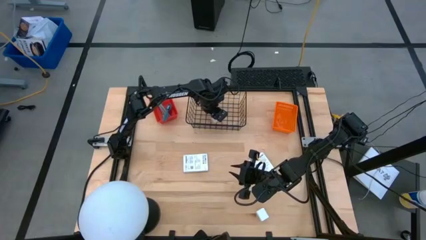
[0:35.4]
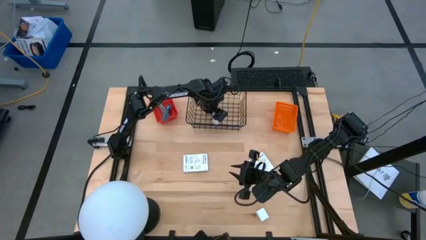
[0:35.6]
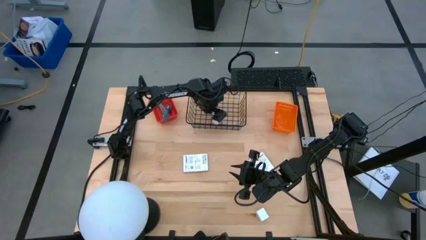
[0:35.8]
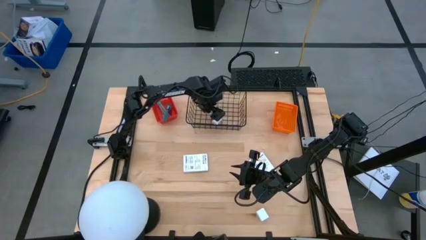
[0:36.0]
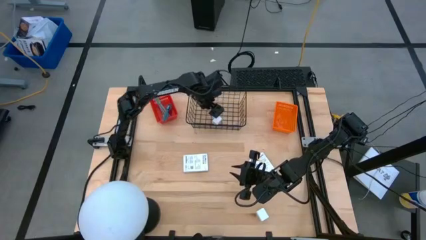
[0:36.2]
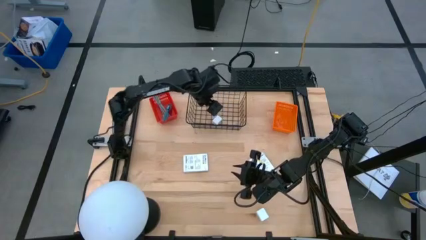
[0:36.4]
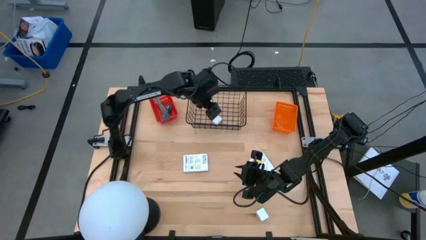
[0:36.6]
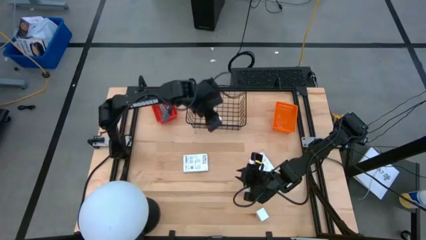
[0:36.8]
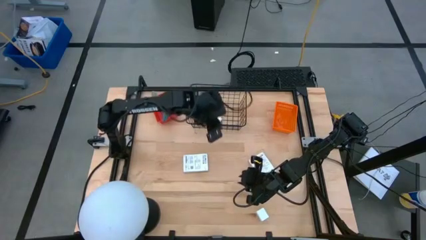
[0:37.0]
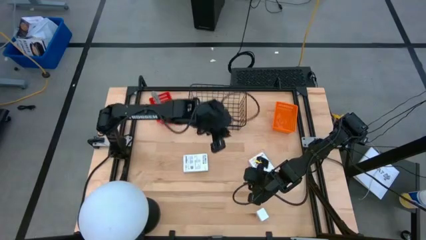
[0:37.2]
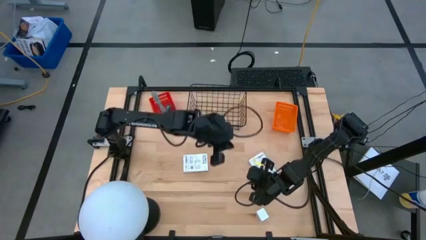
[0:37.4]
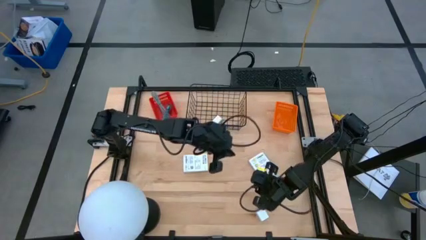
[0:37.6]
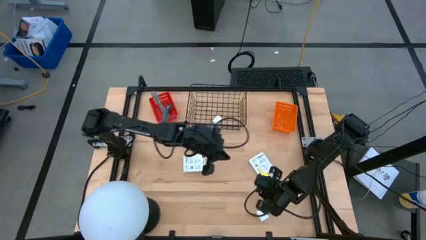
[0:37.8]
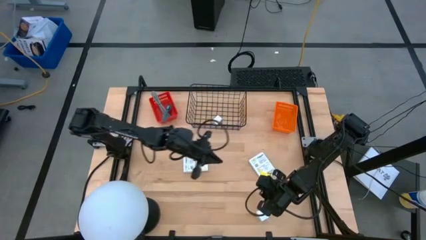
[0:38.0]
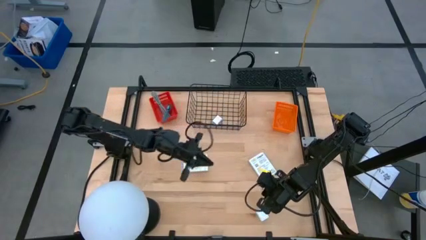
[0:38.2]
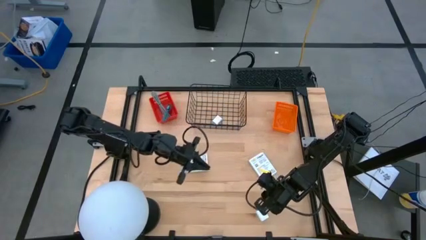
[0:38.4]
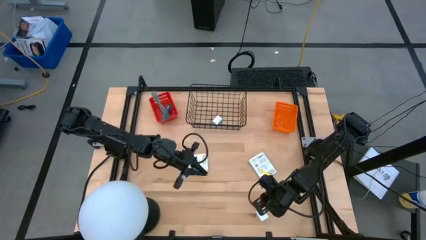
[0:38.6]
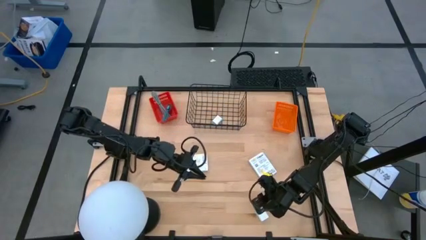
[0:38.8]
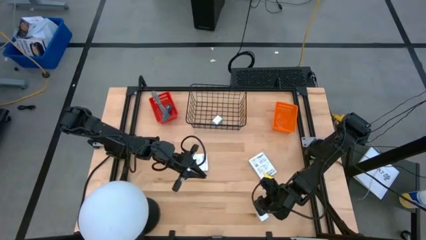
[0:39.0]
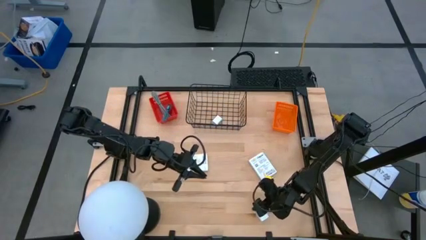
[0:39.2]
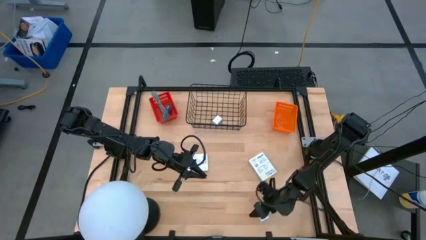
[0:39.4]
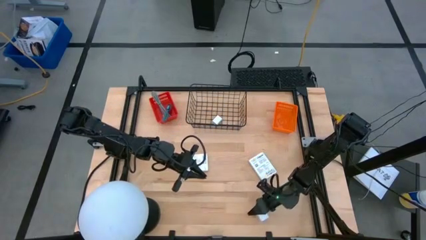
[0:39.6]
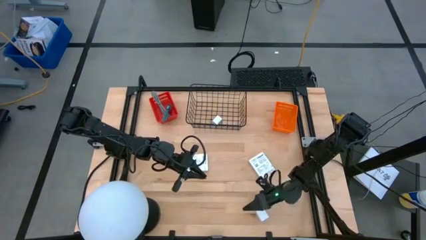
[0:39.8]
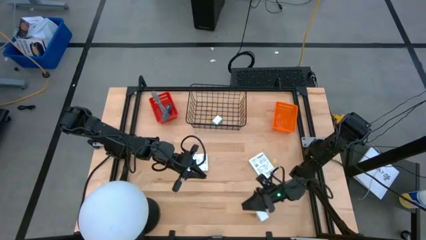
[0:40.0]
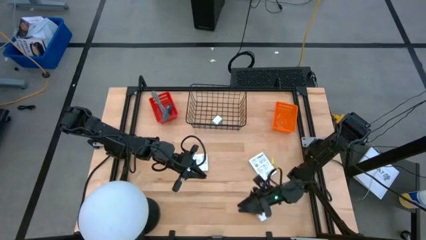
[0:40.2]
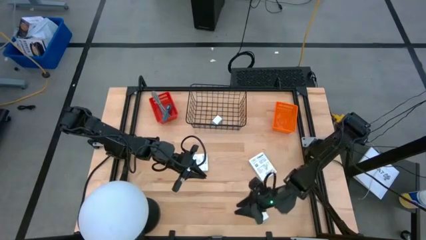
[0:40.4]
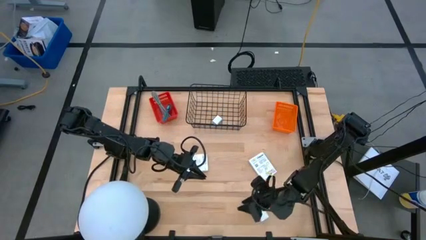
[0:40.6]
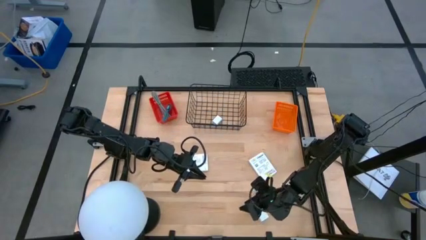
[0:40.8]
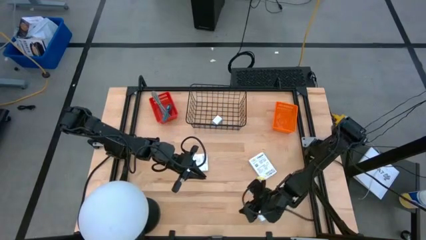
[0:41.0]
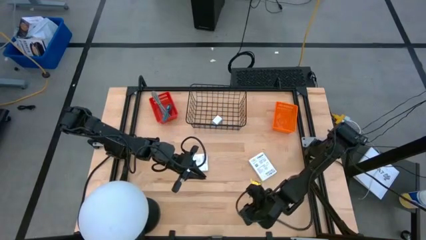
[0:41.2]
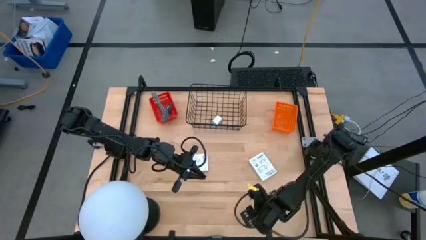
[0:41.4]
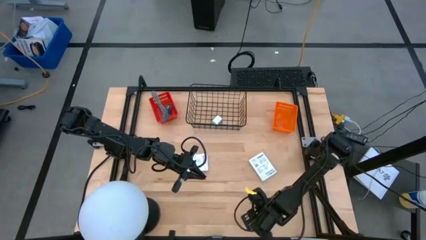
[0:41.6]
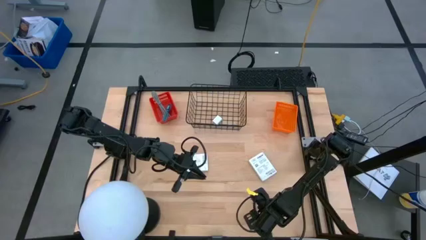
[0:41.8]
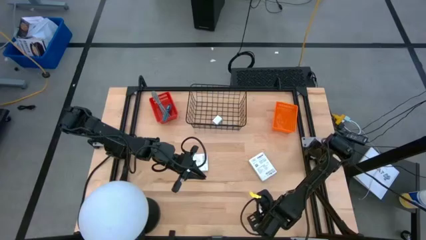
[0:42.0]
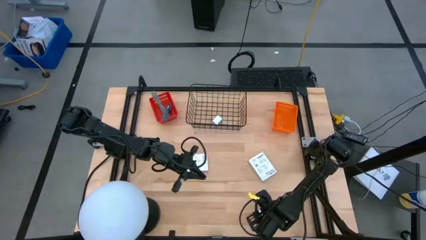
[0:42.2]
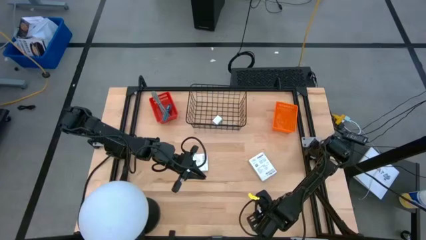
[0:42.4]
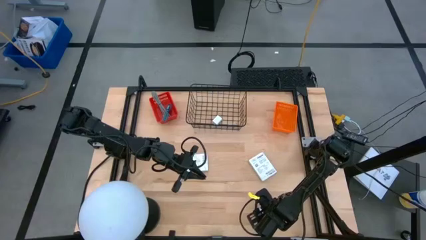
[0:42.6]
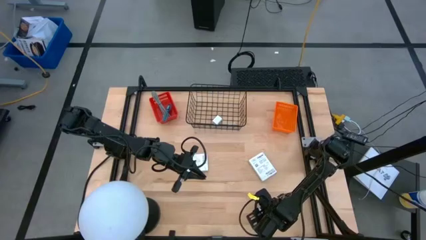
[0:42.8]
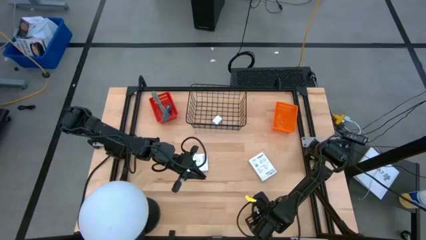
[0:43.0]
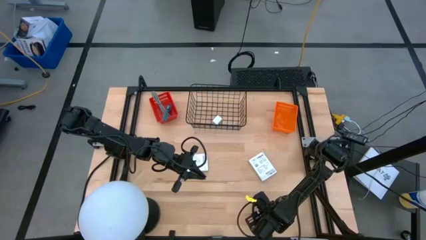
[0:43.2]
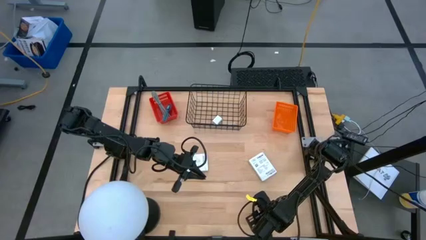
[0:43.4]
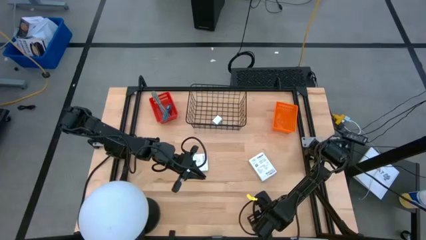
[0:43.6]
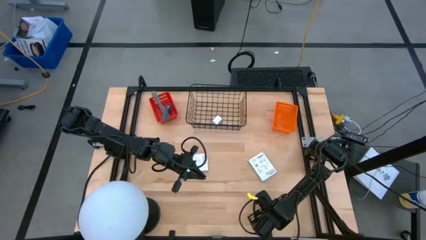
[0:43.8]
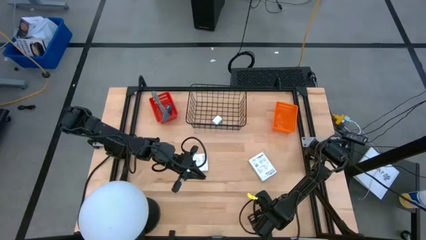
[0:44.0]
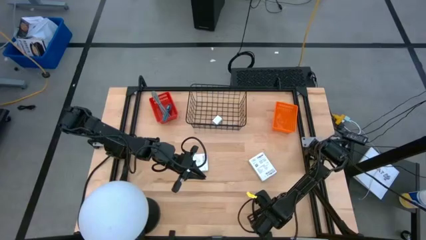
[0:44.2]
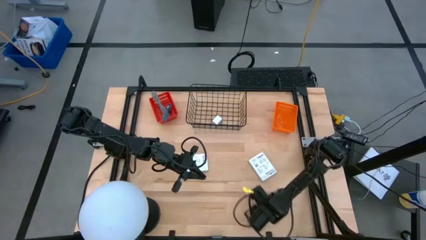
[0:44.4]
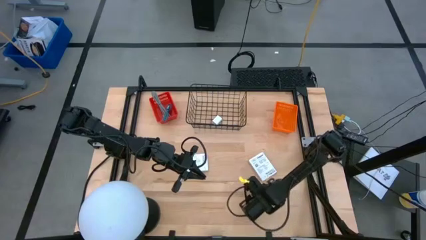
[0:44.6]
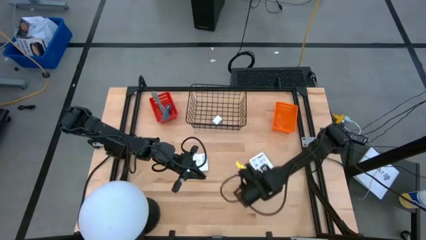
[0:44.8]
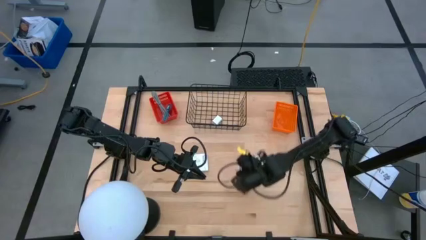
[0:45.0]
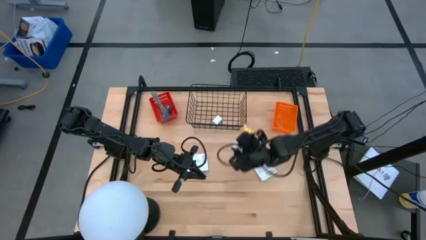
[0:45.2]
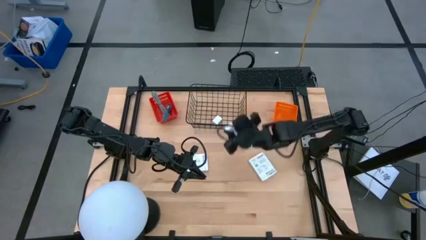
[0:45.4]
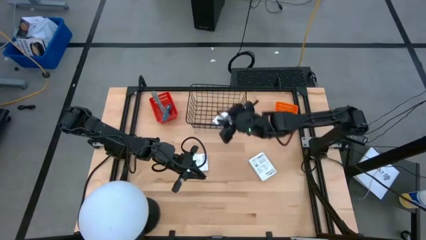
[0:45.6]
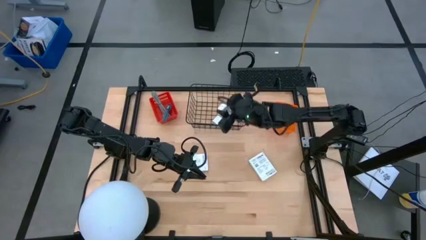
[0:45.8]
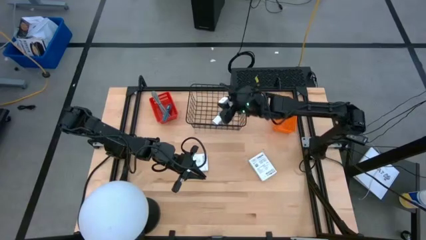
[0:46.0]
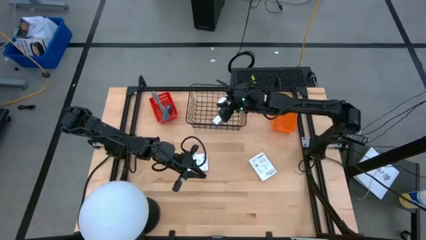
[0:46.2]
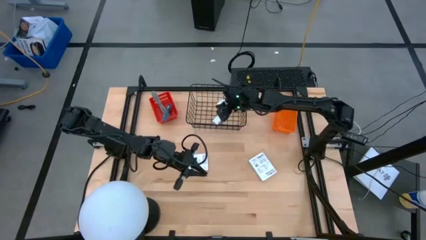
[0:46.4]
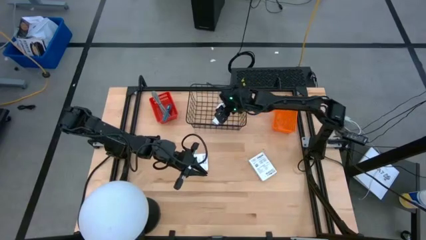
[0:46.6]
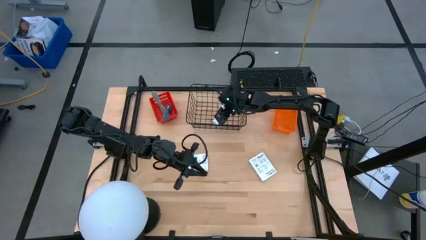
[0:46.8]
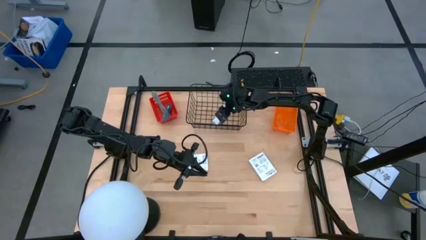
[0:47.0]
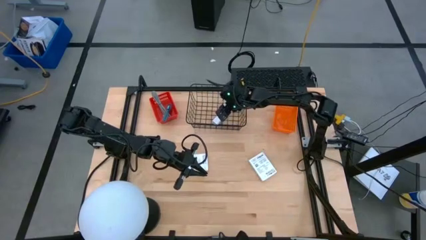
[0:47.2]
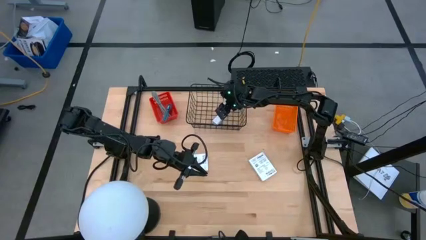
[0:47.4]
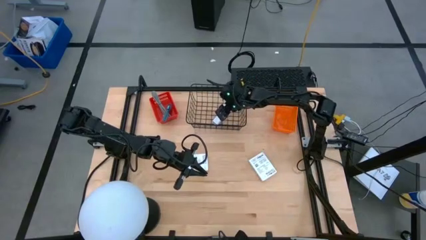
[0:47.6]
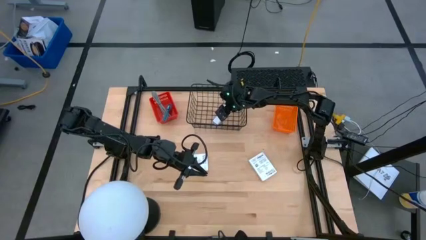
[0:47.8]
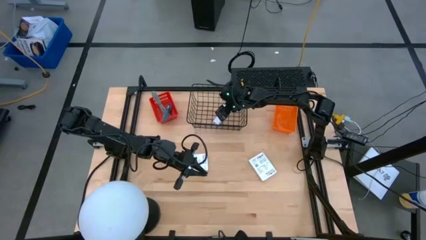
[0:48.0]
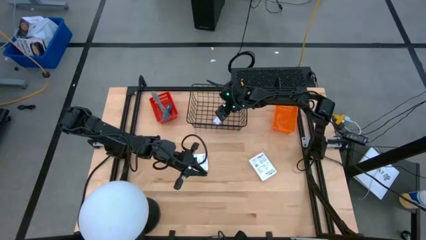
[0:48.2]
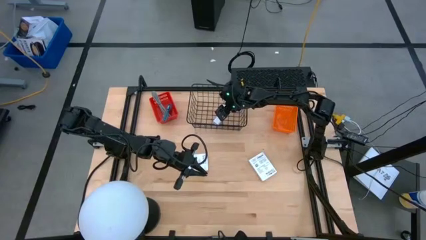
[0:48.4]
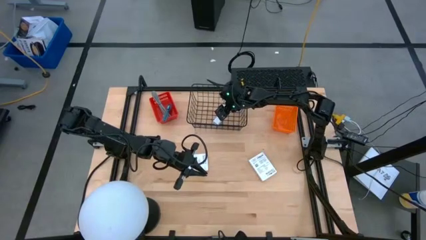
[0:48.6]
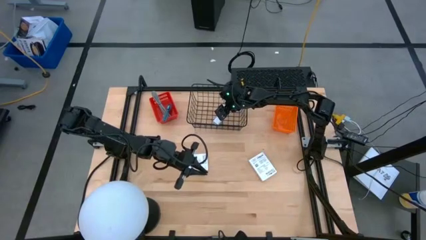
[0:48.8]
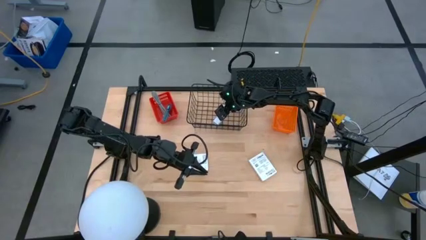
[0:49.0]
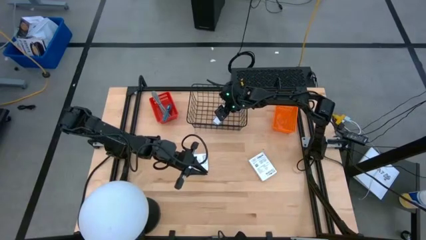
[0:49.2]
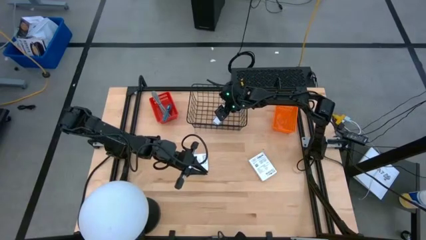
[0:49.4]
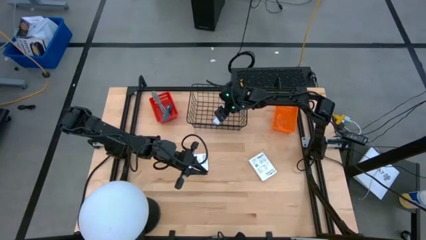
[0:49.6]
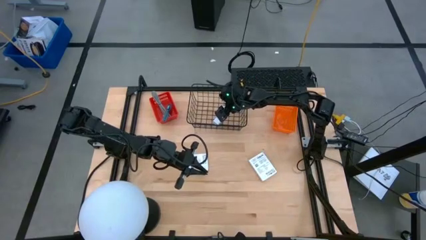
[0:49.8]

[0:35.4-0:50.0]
Task: Pick and place items into bin
Put the white charger adapter into the wire basket
